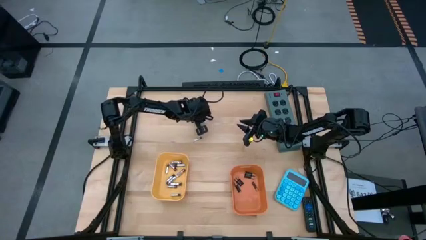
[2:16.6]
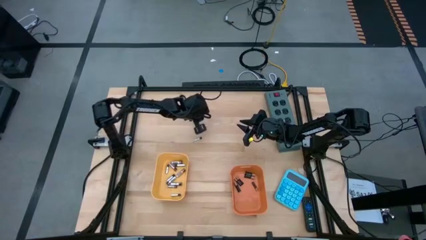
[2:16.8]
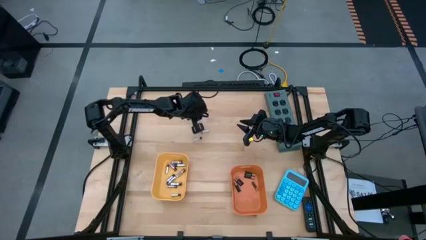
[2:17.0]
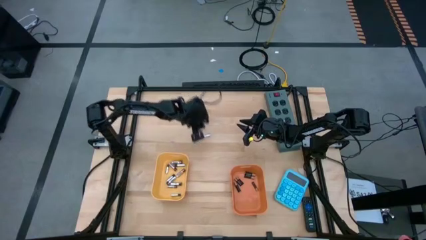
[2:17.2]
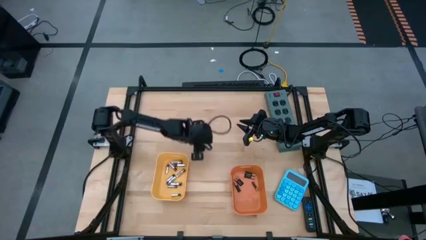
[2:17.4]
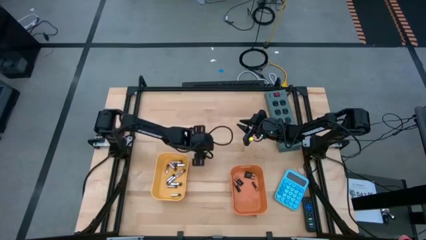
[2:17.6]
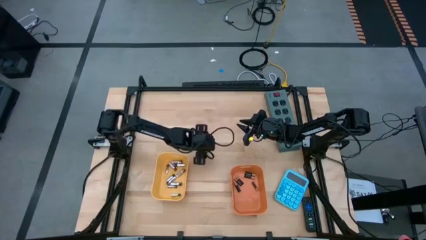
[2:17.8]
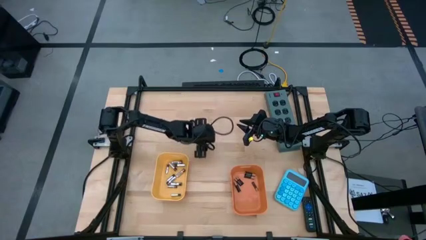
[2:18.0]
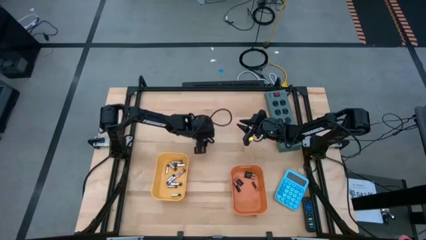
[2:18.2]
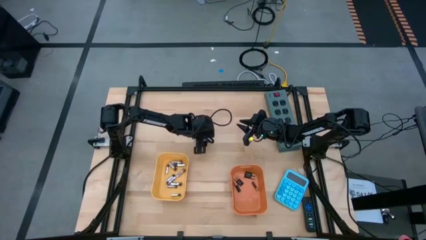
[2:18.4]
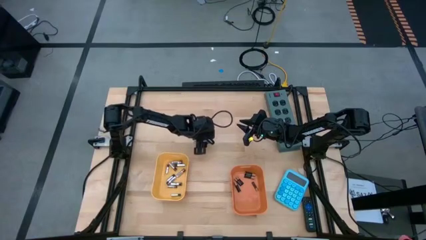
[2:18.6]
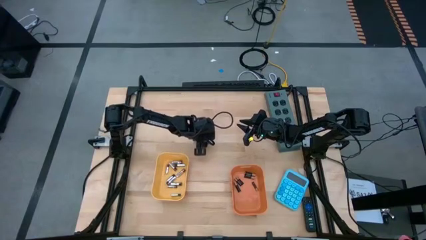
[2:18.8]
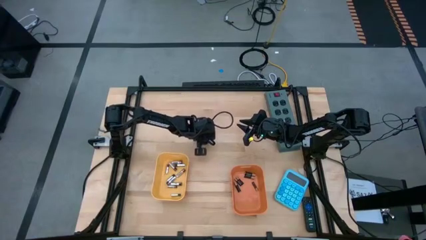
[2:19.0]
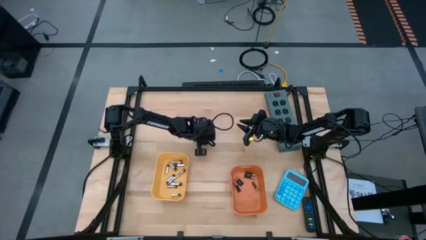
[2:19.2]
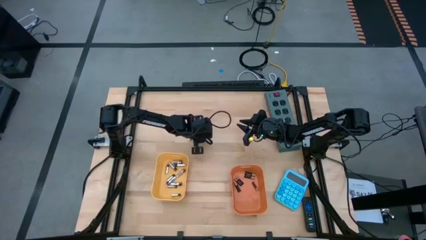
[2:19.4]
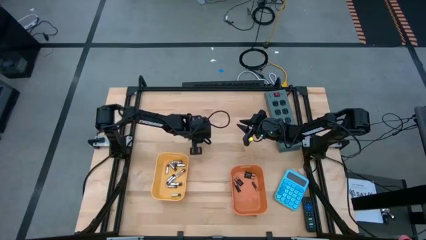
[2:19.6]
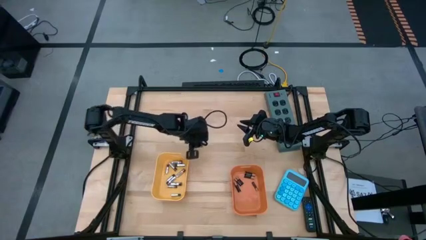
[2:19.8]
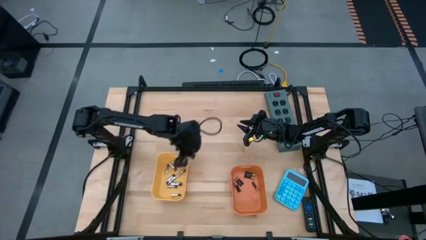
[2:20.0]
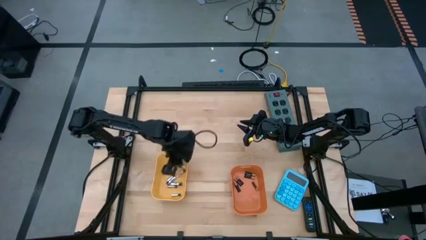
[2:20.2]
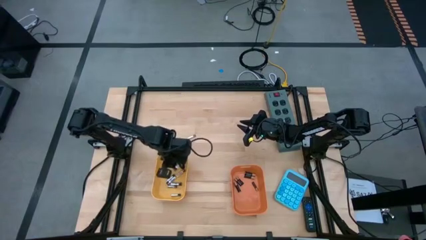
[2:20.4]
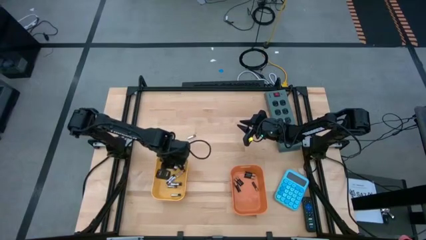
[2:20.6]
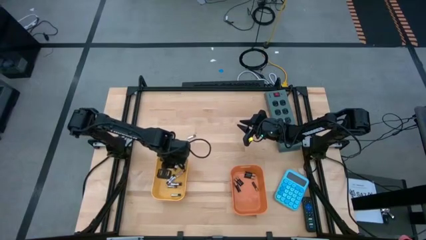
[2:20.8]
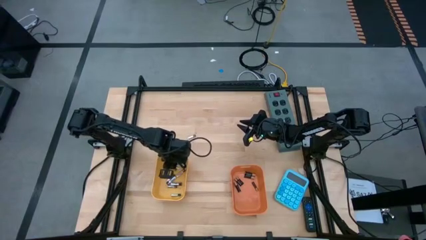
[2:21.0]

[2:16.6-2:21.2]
Task: Sort batteries
Put the silver battery into the yellow bin

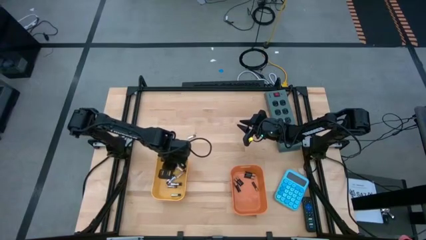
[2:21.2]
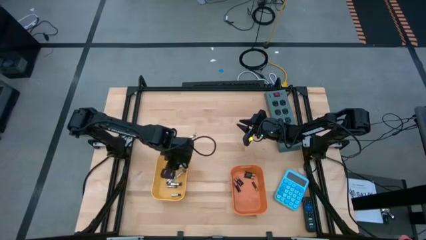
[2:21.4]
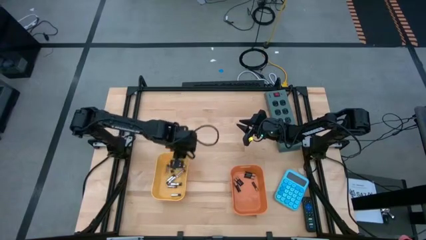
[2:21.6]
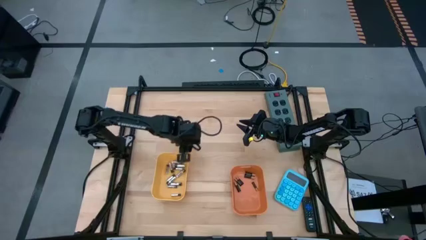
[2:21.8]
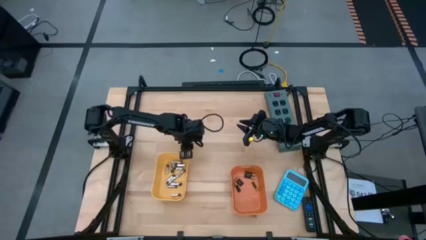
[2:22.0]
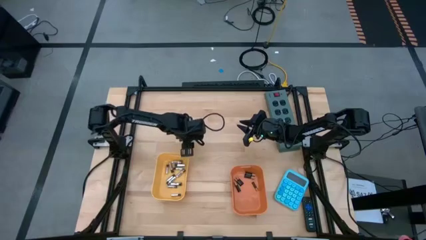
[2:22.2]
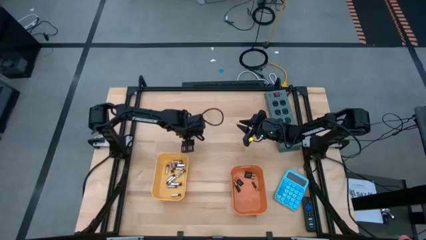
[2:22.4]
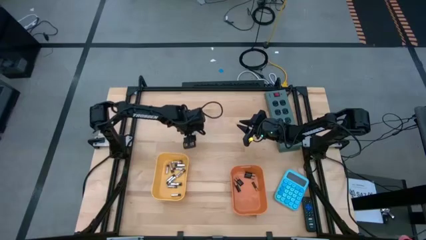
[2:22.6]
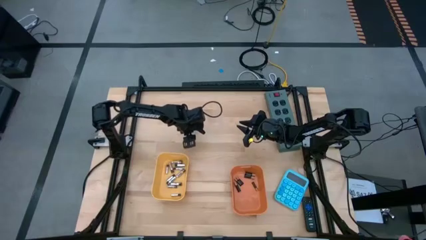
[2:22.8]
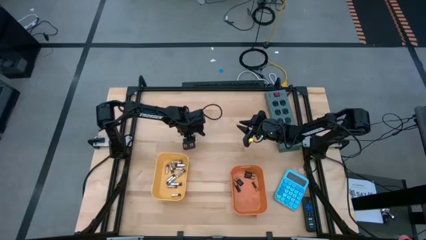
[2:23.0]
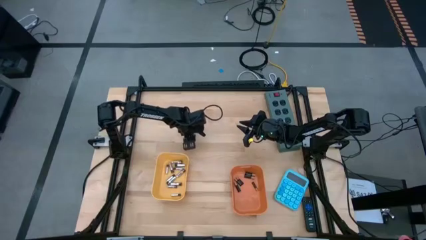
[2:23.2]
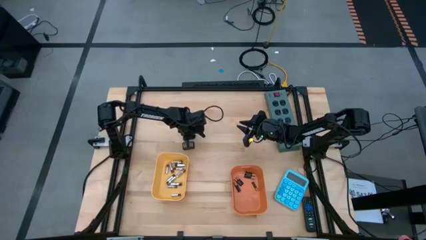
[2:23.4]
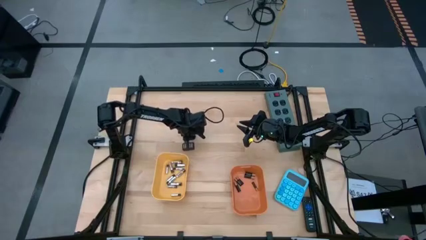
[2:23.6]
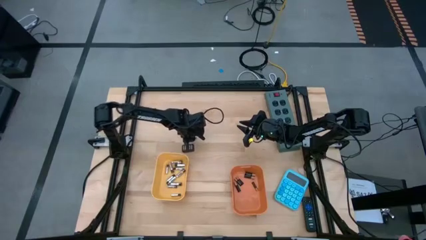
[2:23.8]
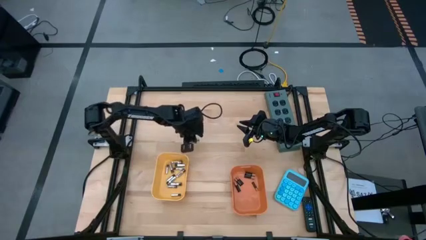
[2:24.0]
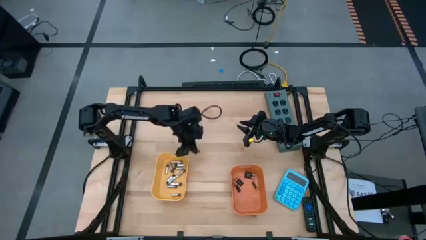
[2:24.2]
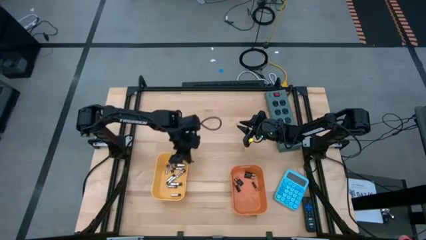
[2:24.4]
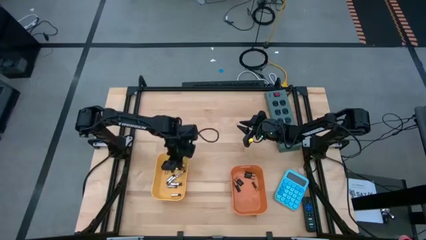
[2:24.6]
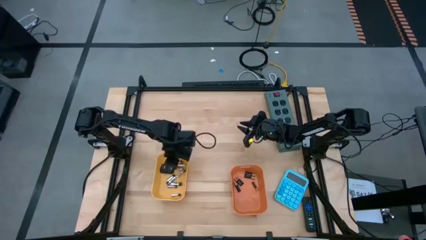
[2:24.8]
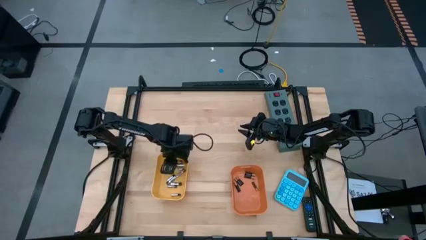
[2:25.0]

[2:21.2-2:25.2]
Put the silver battery into the yellow bin

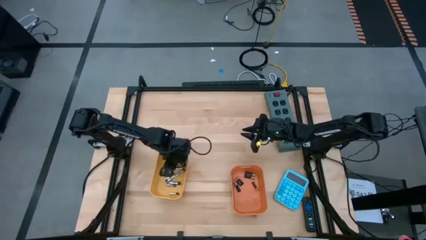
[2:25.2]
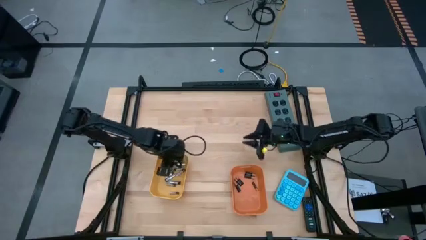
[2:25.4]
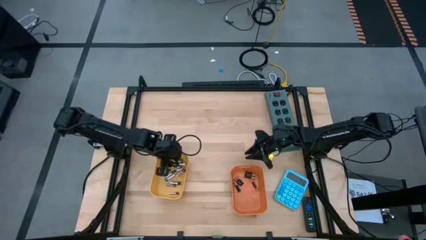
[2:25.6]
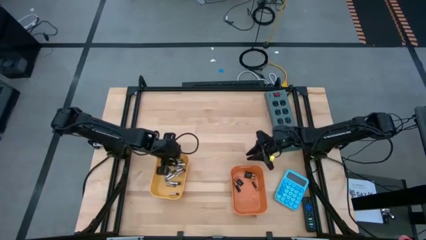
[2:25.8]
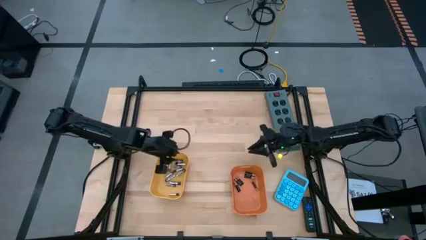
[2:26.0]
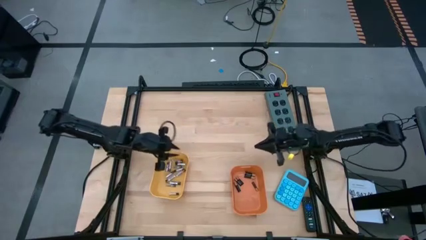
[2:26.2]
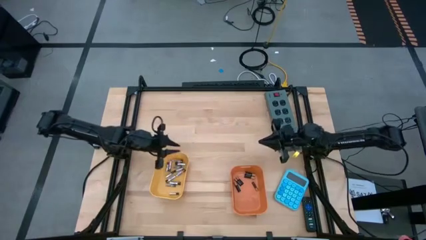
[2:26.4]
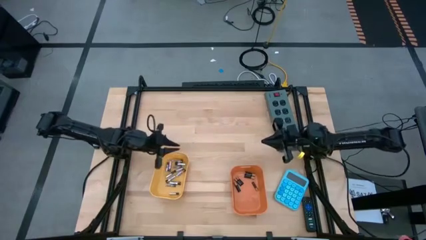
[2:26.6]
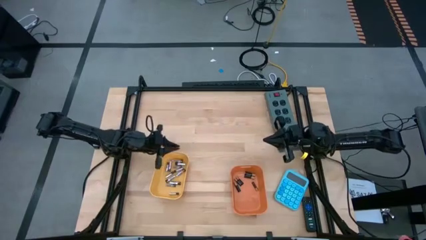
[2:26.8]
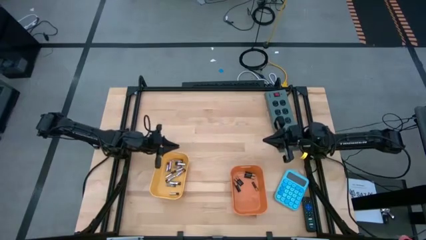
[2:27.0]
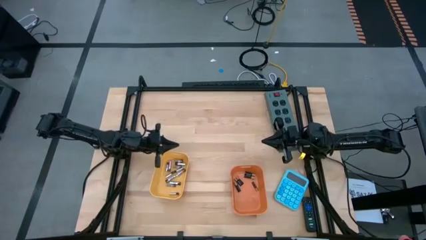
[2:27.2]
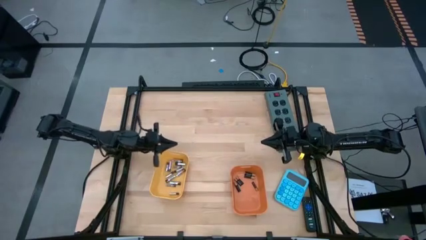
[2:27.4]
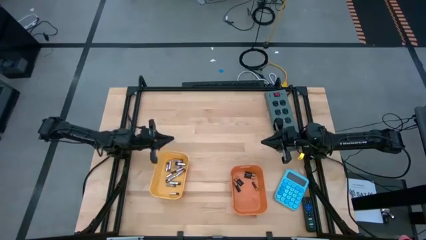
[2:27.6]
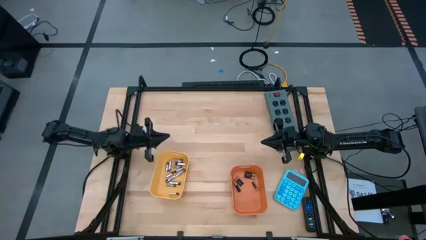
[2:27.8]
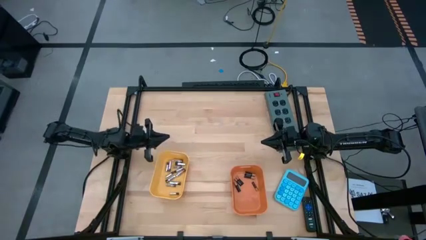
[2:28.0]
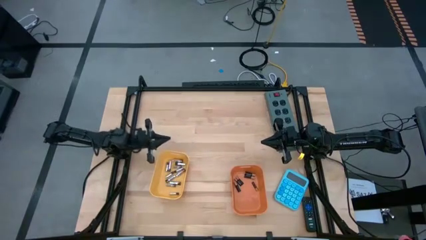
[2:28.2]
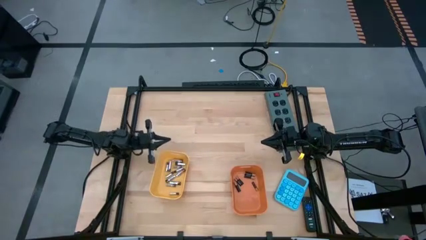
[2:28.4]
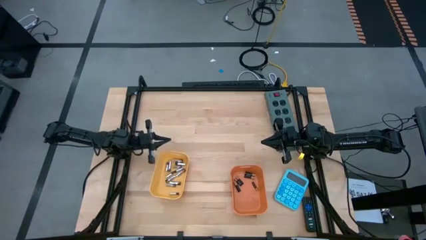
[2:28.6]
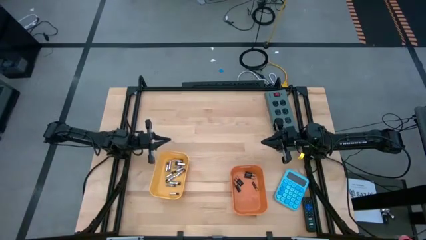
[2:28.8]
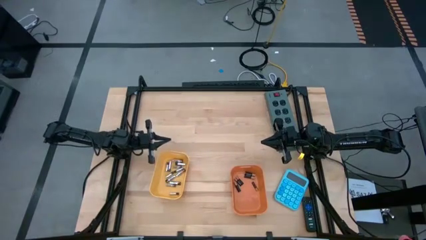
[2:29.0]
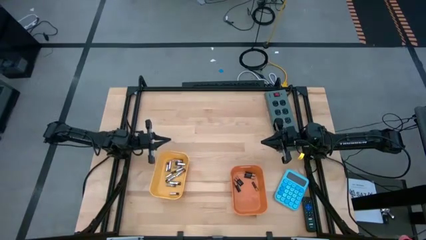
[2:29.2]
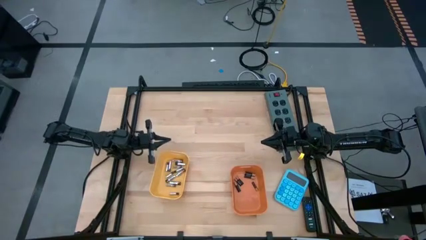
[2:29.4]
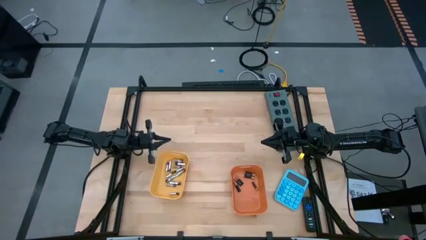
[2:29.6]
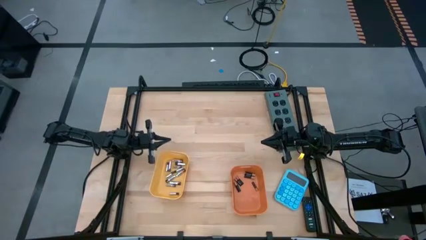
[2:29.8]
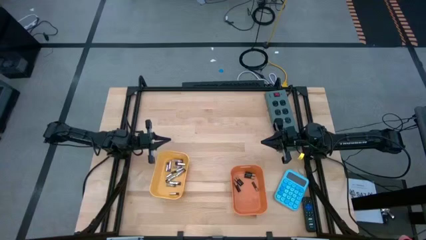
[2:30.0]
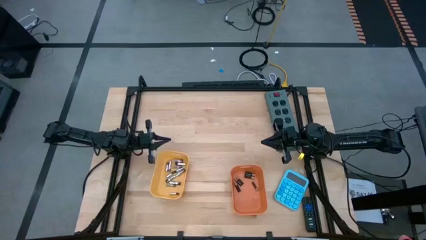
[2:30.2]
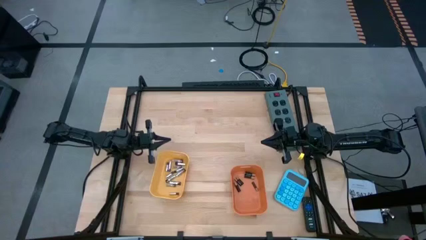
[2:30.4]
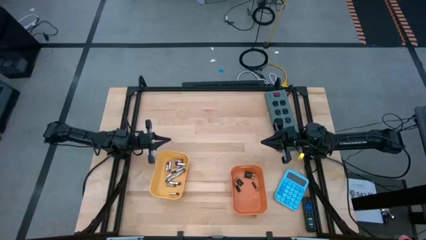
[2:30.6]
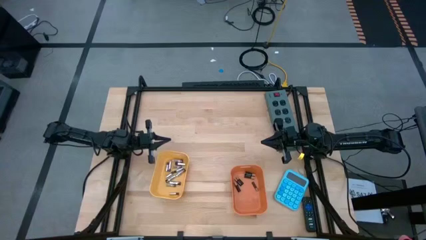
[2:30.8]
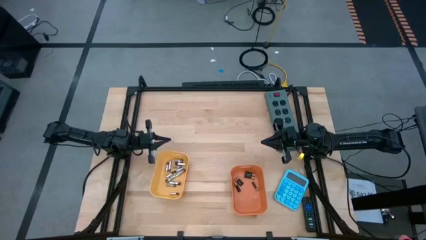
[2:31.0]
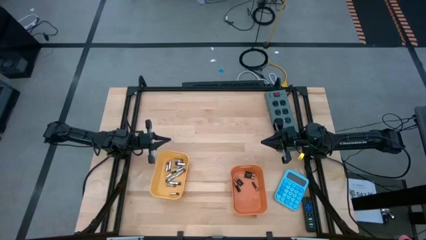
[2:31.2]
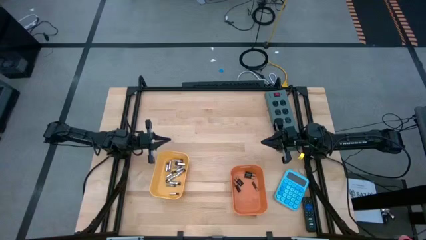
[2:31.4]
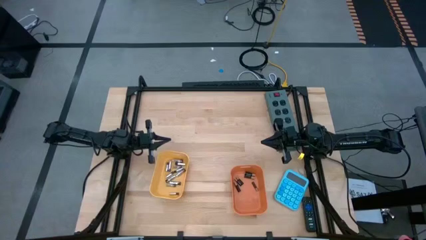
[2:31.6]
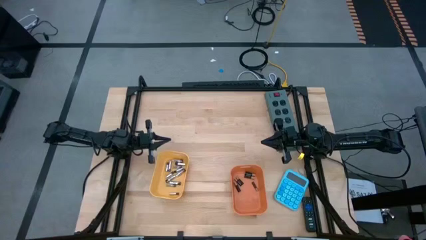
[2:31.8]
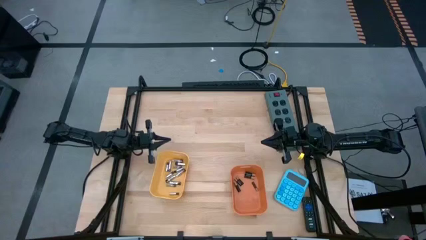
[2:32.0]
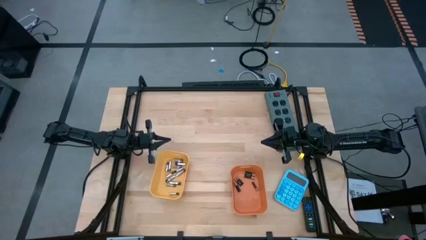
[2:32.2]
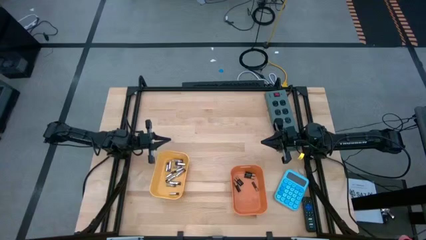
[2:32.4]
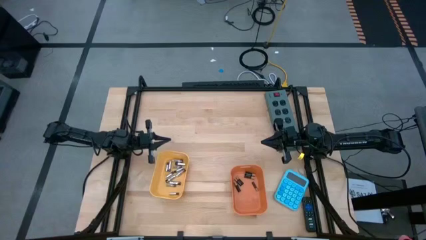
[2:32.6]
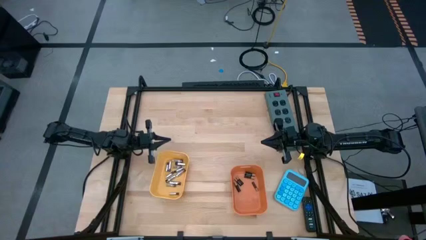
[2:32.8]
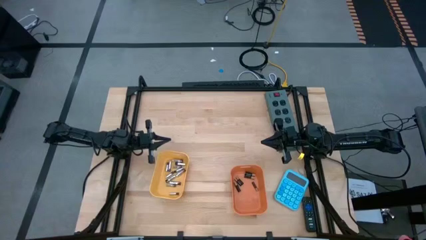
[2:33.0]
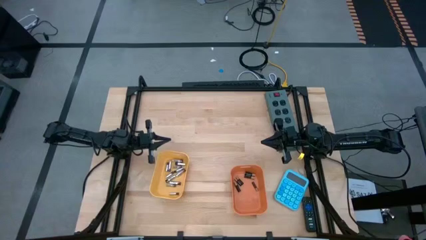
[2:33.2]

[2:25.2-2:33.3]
Return to Home Position
